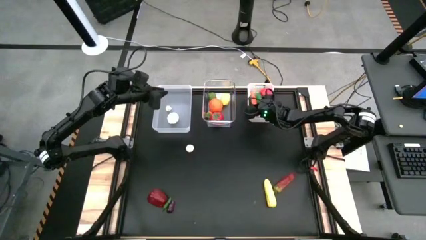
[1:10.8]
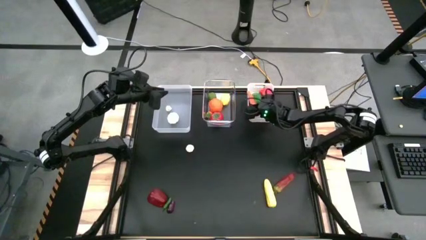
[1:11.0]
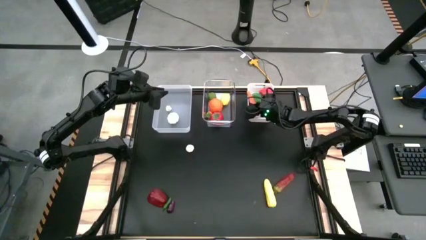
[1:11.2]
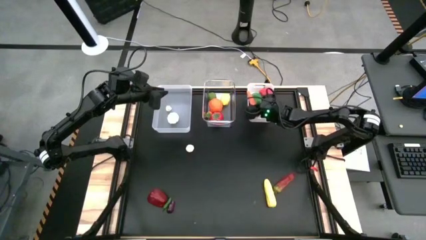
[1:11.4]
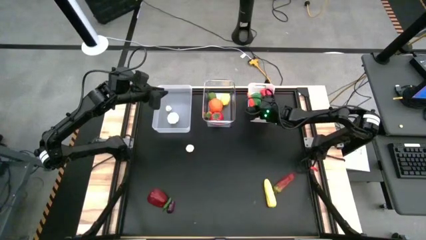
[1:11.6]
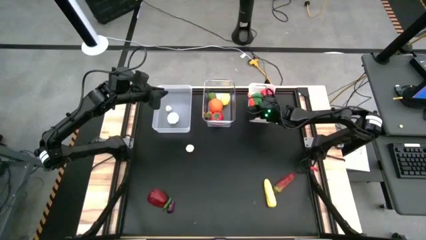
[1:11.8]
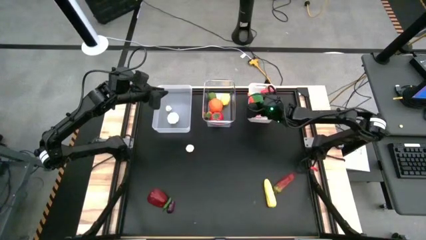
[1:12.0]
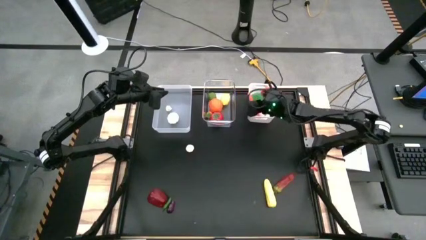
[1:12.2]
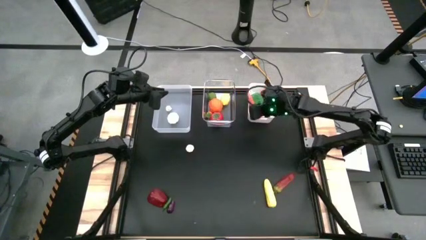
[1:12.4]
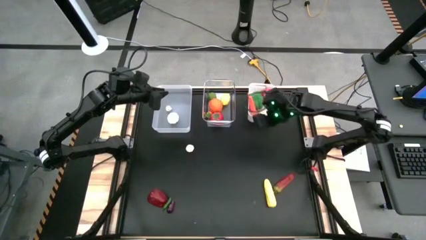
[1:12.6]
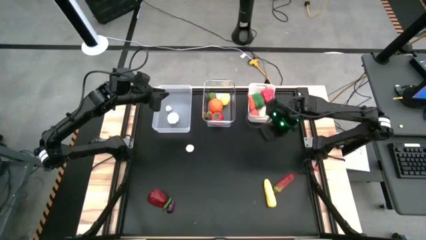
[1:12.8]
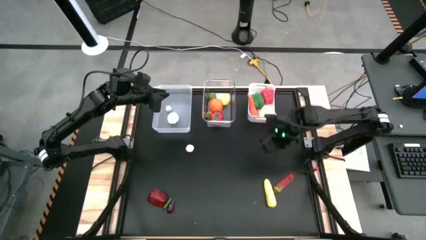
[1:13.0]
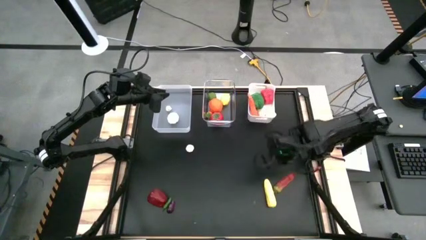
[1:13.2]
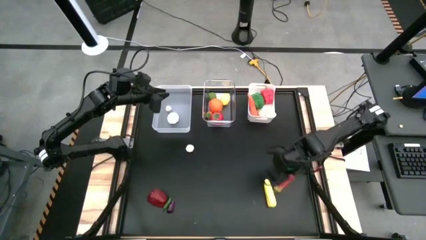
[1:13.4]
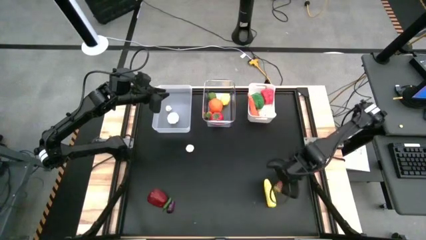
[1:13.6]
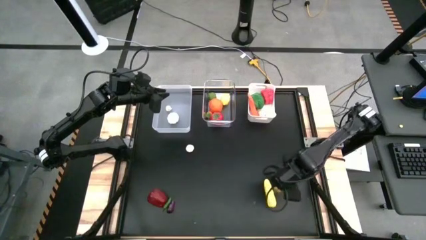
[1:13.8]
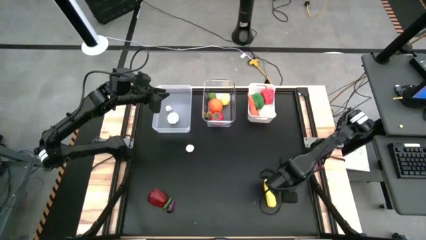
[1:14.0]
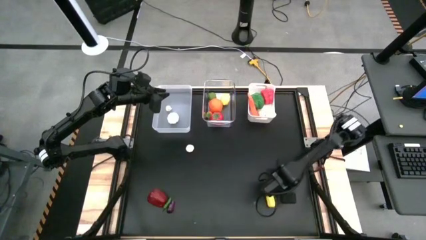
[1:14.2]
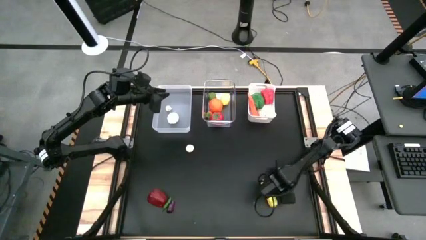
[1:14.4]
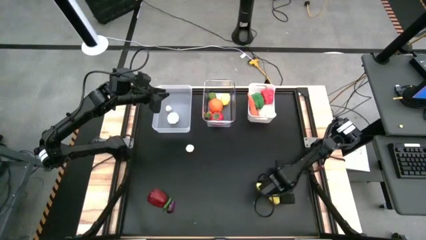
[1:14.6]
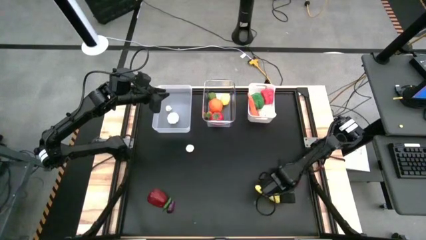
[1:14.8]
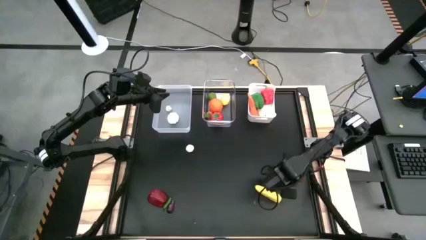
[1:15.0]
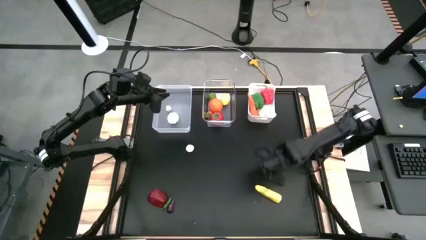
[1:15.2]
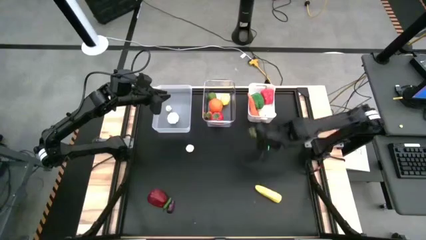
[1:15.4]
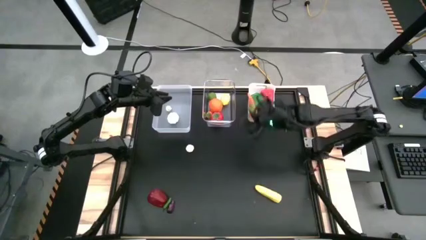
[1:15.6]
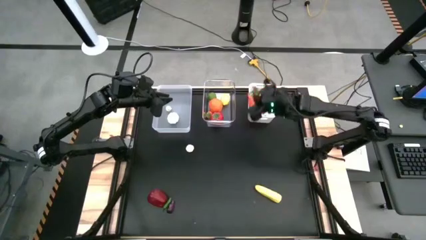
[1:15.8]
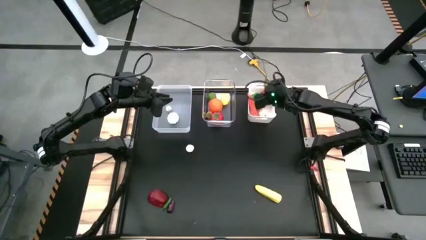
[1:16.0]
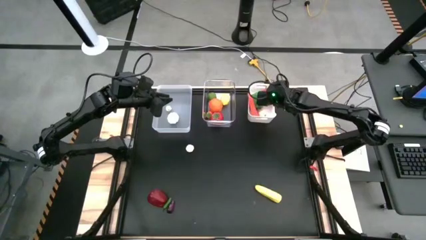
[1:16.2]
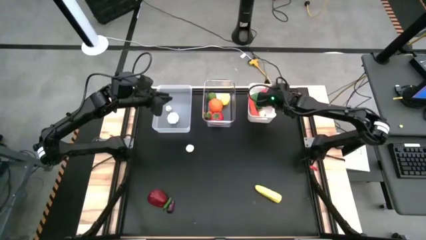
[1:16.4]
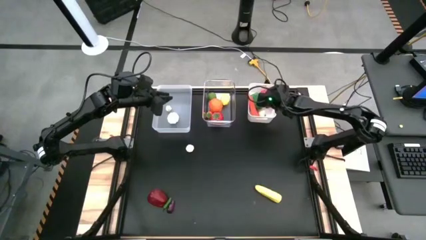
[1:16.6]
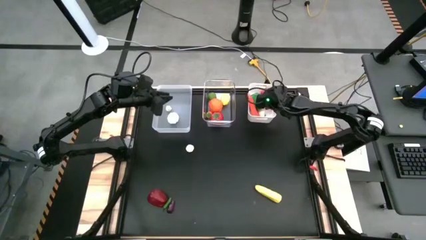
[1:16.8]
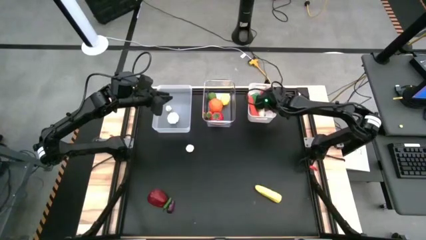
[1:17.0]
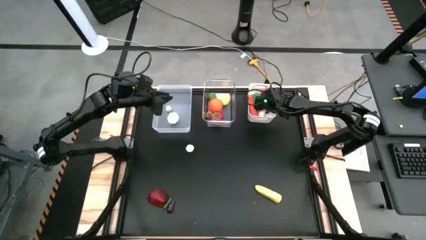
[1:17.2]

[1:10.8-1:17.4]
Task: Sort produce into baskets
Put the orange bell pepper into the white bin

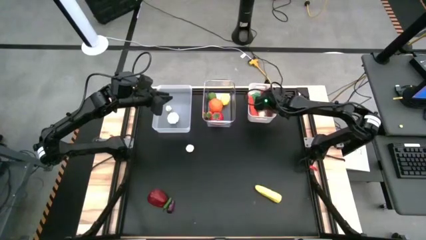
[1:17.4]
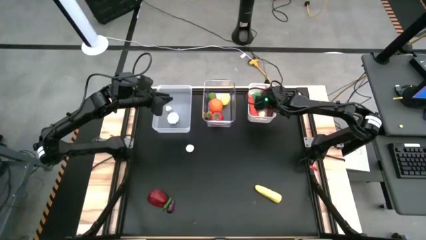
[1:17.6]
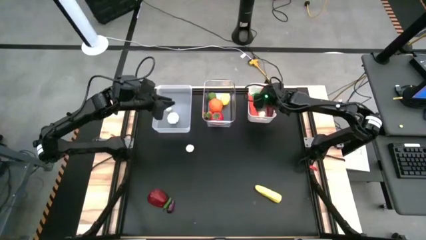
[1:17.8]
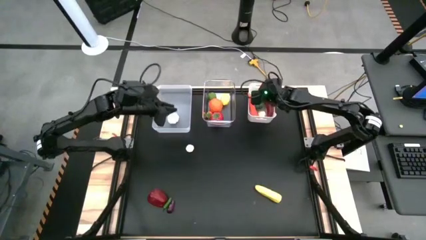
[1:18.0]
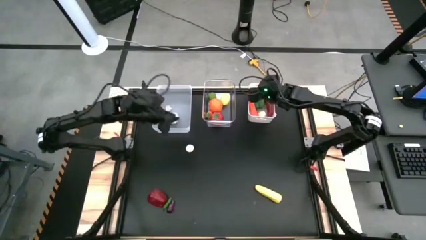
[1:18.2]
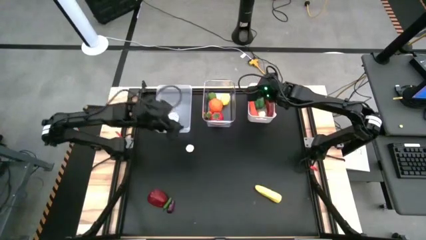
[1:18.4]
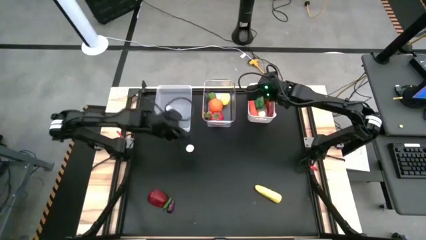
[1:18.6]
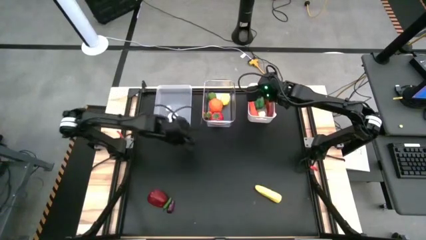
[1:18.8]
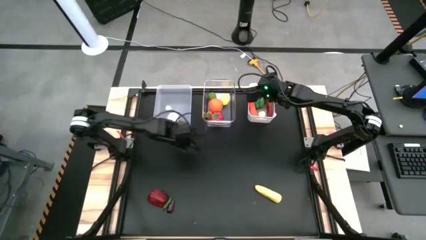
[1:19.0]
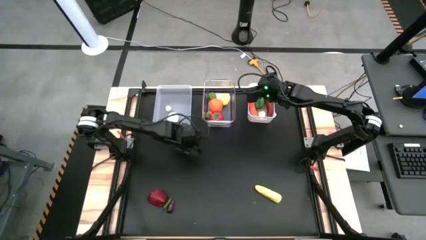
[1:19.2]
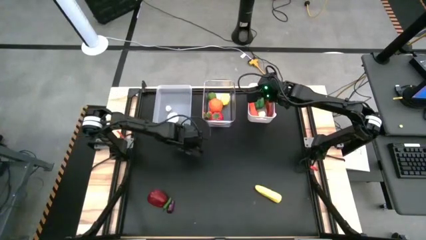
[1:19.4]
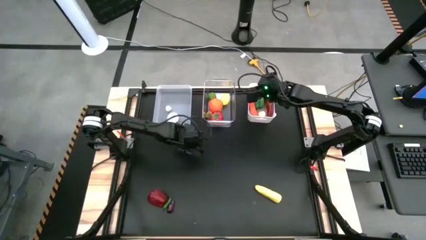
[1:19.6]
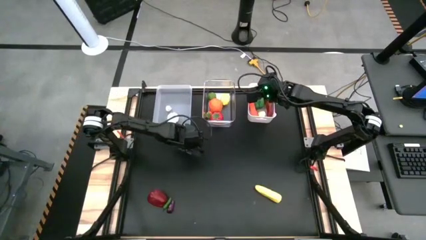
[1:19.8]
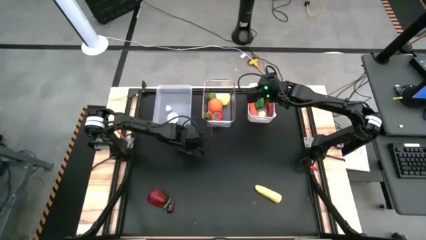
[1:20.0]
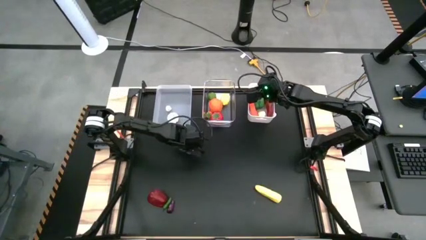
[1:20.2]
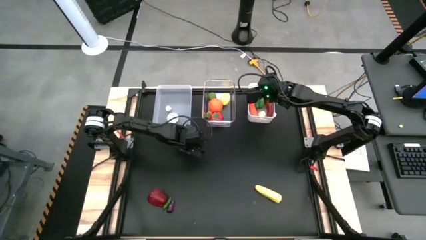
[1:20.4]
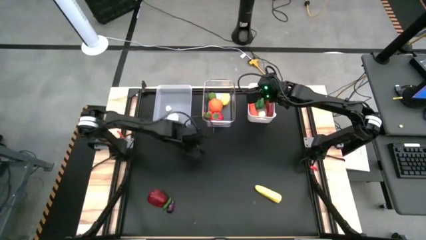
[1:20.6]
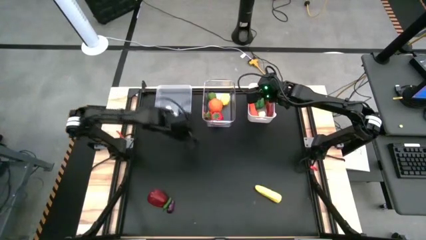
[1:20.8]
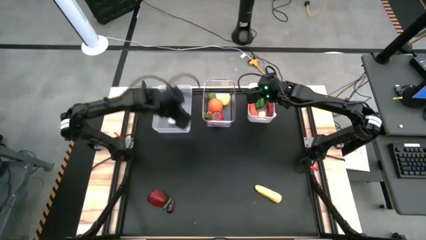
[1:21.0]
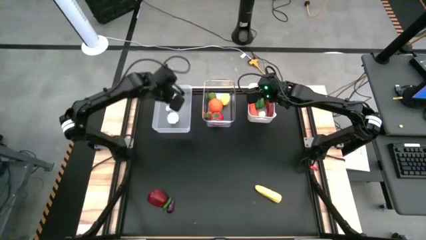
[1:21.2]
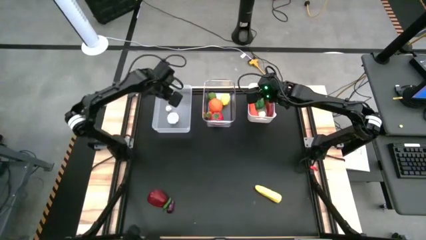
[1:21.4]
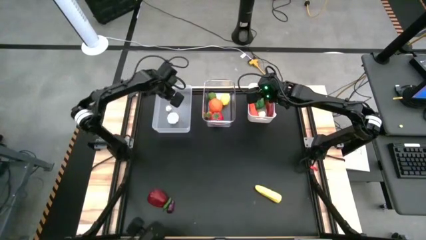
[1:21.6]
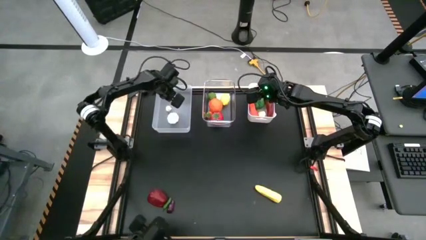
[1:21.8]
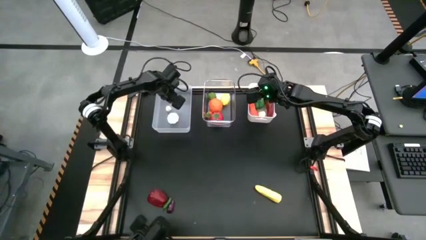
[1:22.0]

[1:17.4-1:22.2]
Put the white small garlic into the left transparent bin

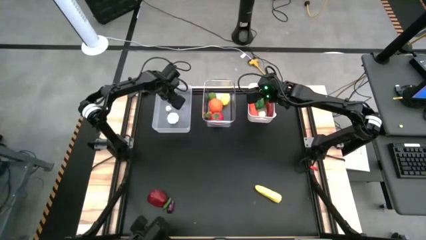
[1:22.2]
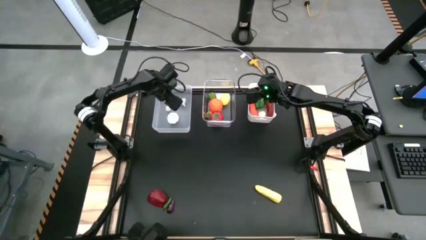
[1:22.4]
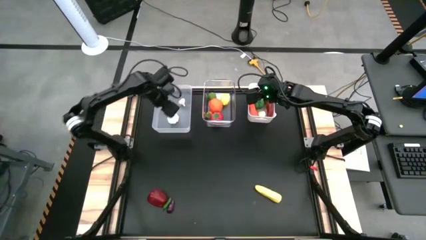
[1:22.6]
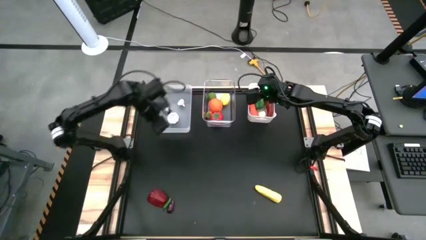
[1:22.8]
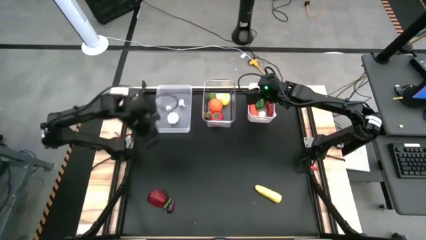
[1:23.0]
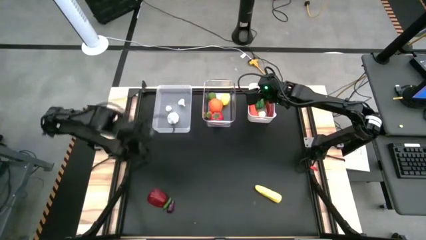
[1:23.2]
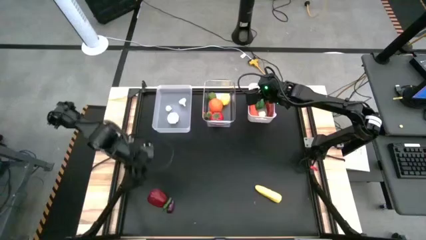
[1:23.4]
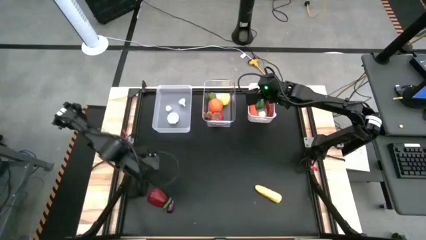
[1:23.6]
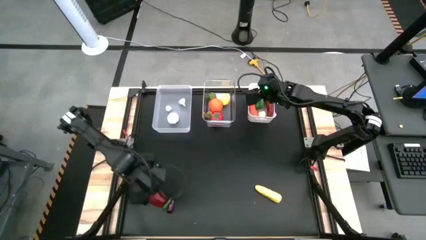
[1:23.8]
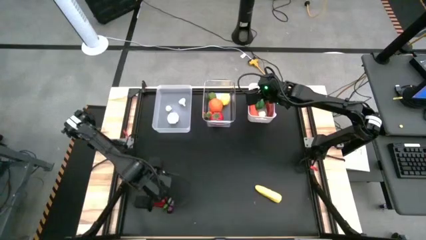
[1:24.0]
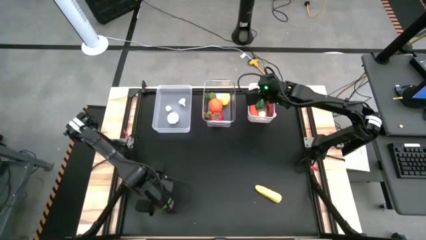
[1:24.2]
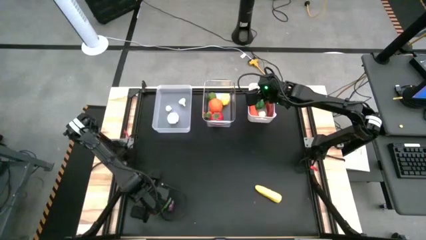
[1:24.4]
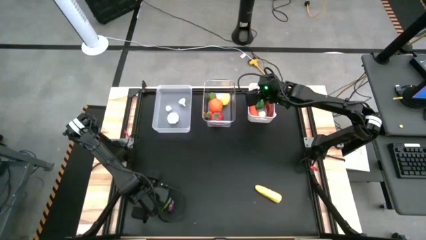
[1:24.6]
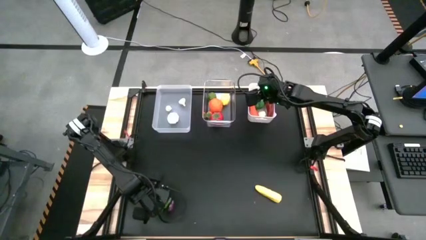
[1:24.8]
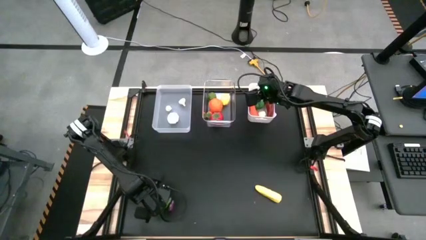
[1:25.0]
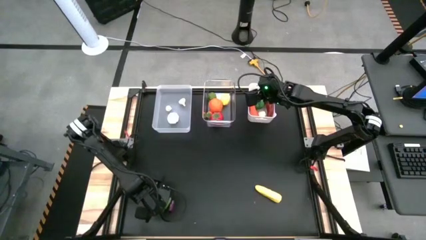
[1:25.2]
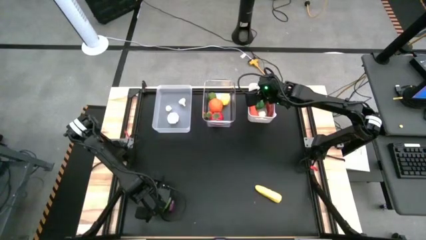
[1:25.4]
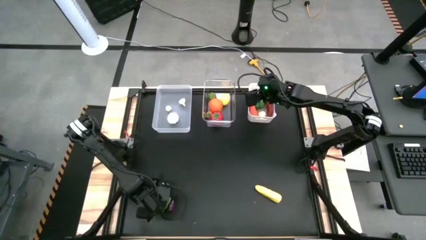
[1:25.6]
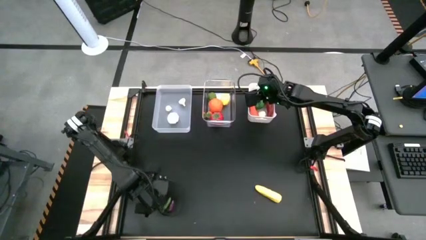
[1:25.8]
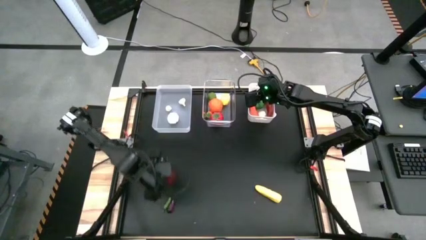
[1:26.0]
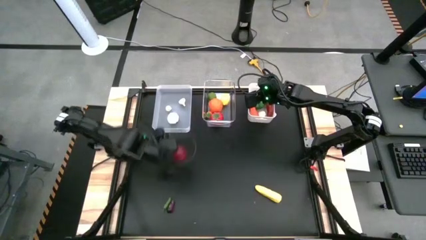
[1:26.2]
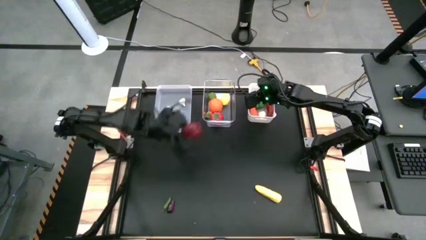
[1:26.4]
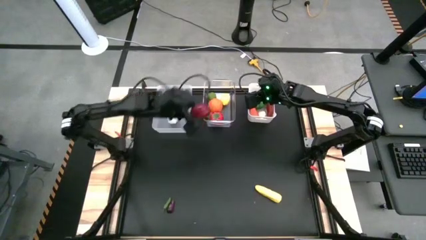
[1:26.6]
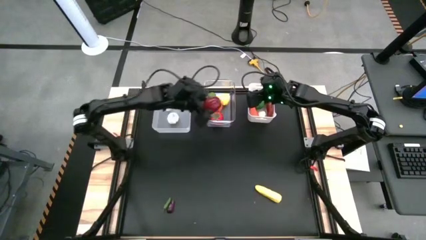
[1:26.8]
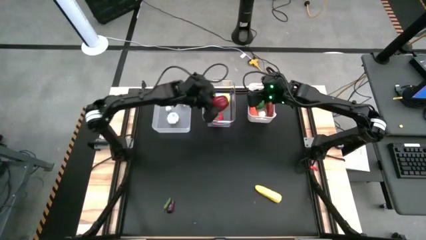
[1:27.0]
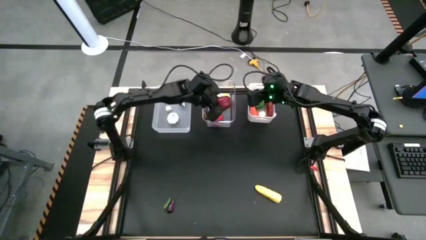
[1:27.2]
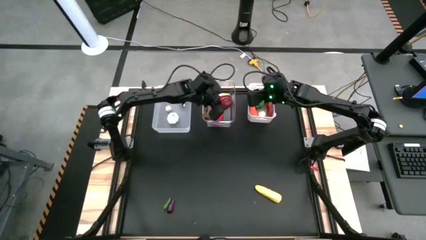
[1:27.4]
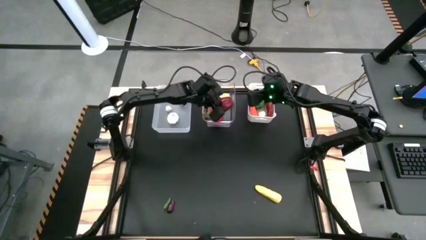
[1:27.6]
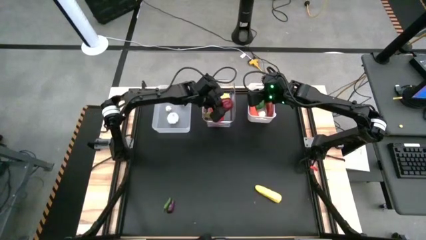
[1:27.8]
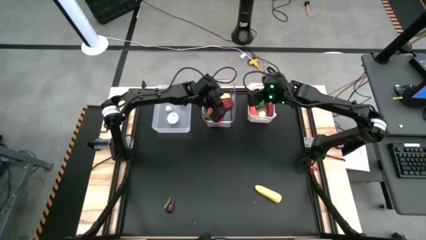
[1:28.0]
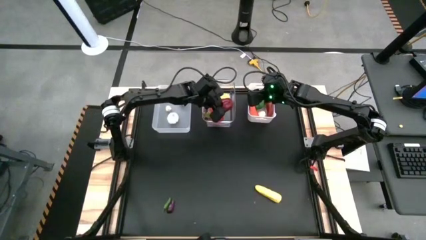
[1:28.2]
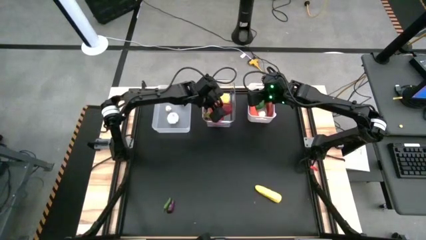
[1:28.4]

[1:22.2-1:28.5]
Put the red bell pepper into the right transparent bin
